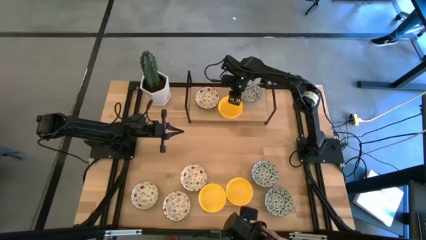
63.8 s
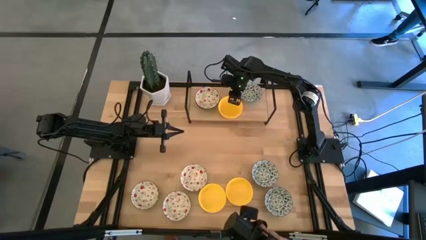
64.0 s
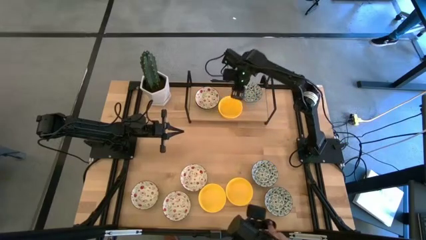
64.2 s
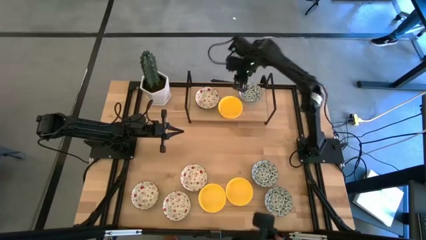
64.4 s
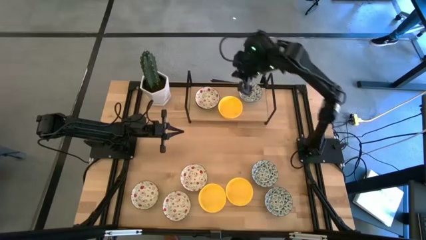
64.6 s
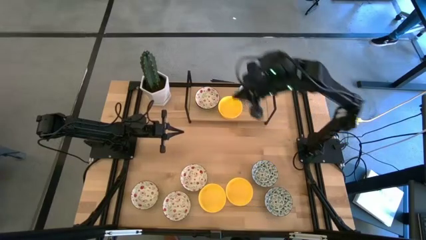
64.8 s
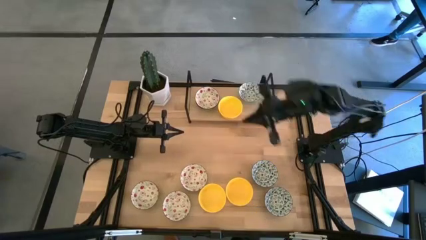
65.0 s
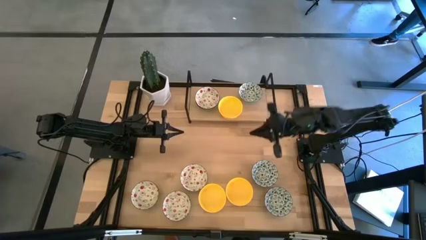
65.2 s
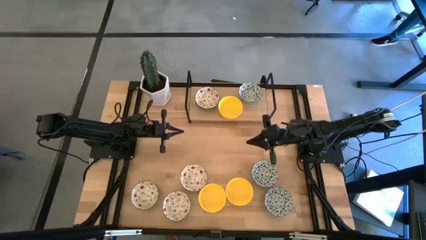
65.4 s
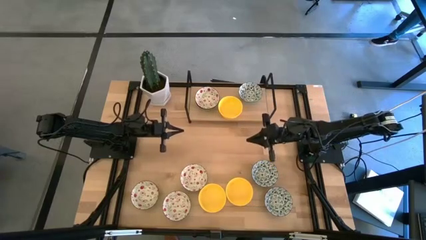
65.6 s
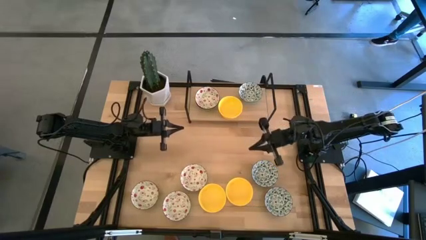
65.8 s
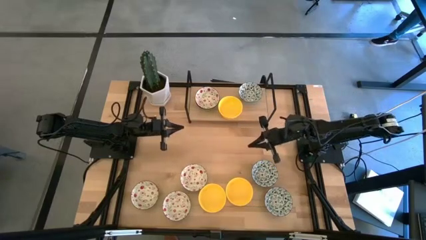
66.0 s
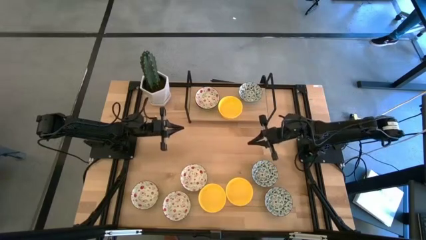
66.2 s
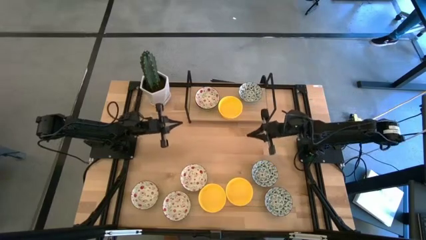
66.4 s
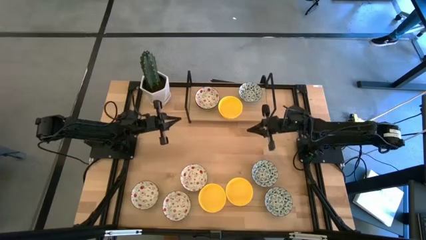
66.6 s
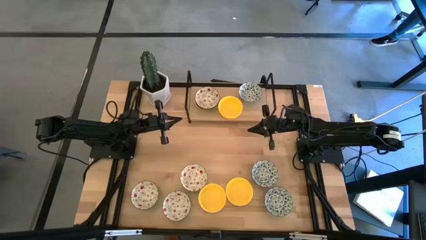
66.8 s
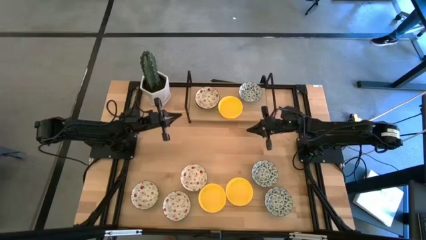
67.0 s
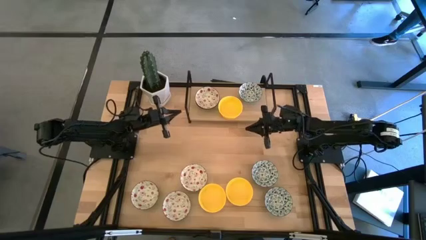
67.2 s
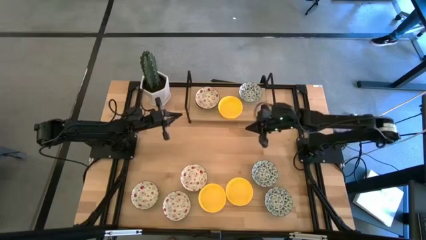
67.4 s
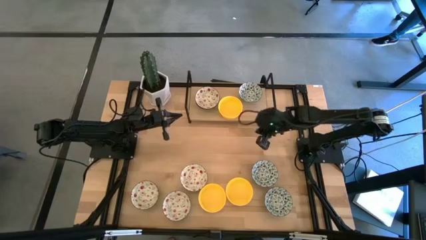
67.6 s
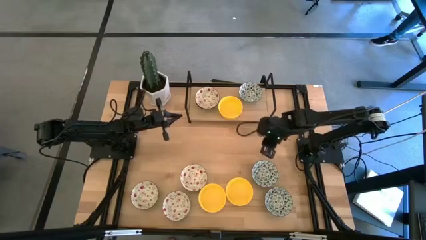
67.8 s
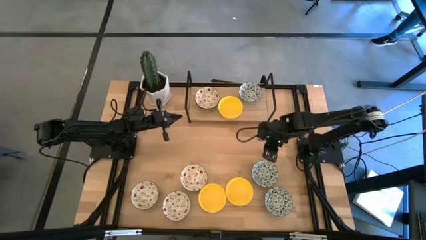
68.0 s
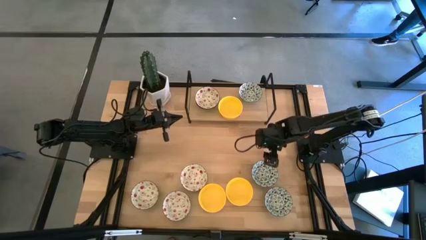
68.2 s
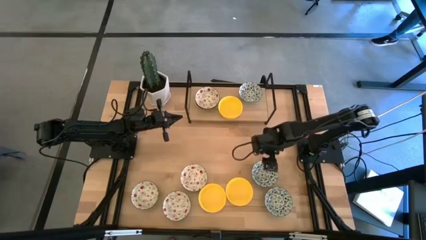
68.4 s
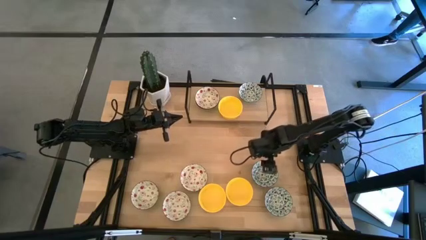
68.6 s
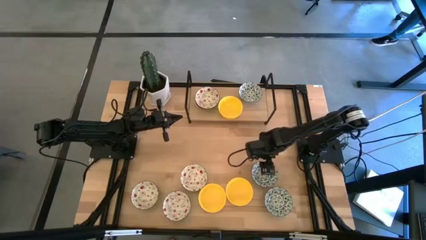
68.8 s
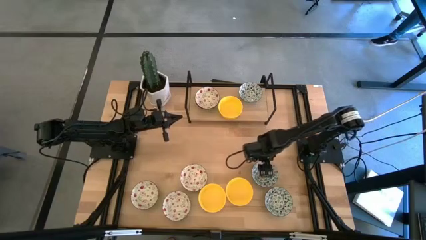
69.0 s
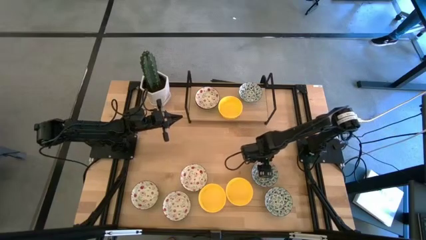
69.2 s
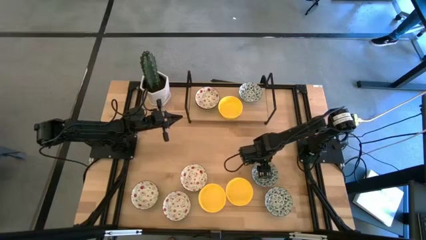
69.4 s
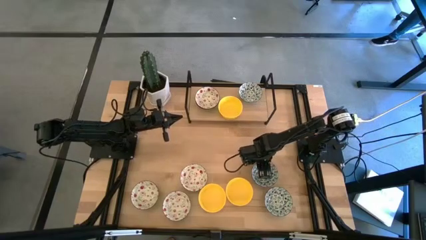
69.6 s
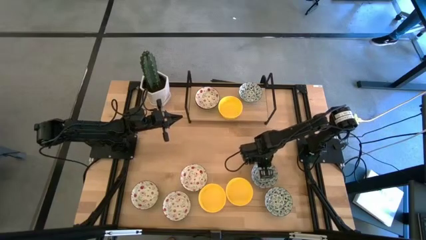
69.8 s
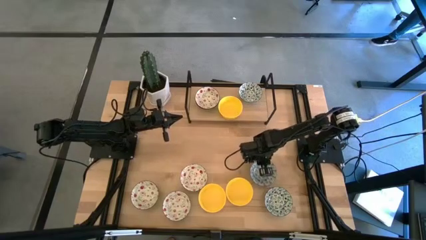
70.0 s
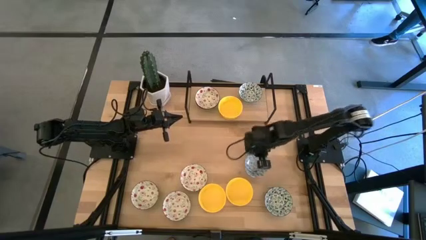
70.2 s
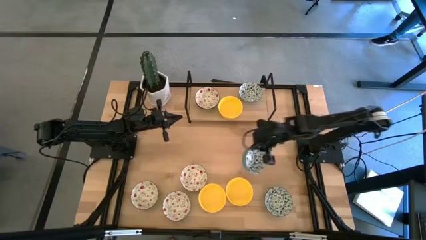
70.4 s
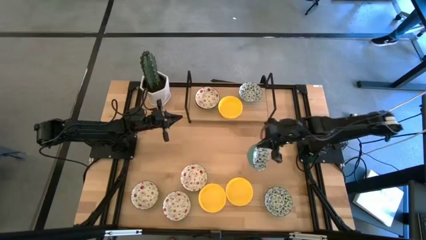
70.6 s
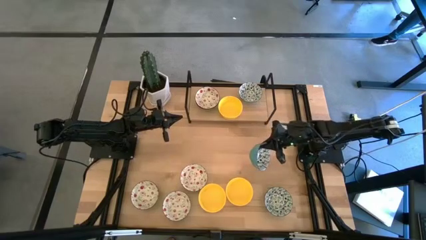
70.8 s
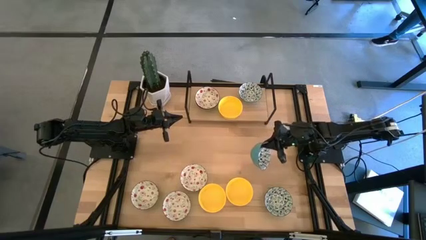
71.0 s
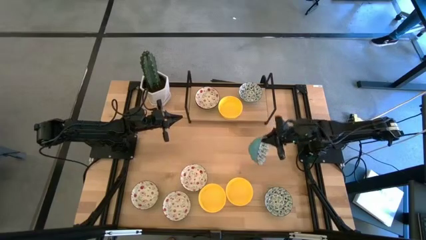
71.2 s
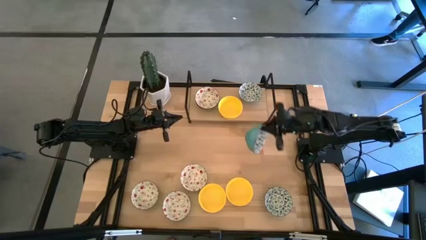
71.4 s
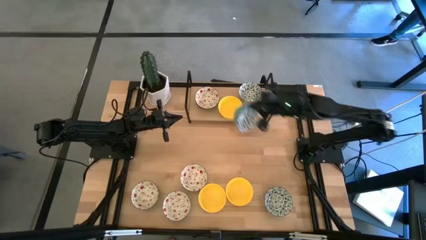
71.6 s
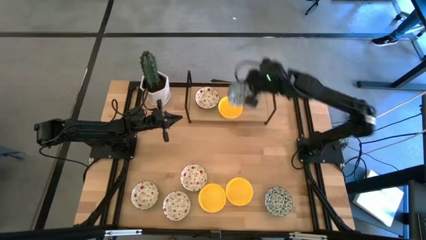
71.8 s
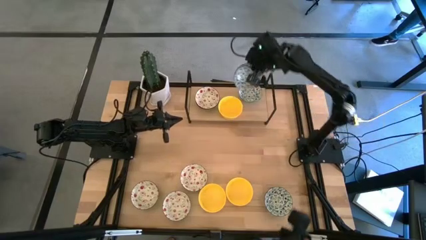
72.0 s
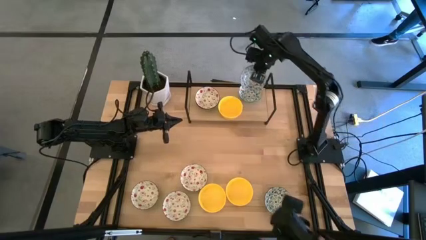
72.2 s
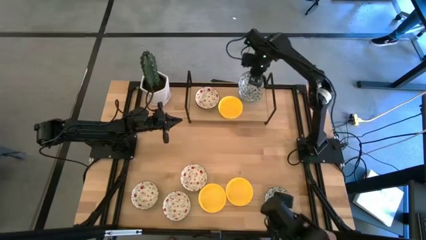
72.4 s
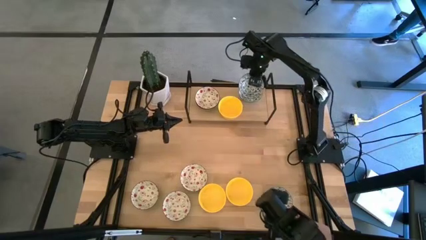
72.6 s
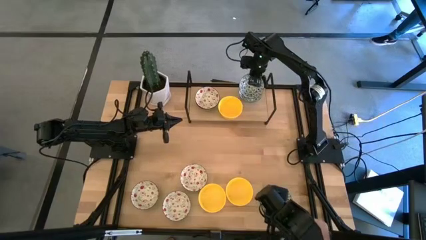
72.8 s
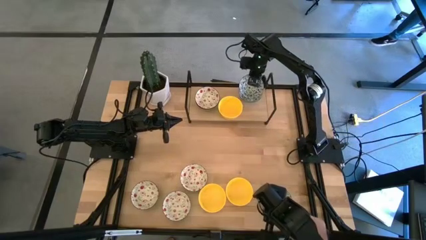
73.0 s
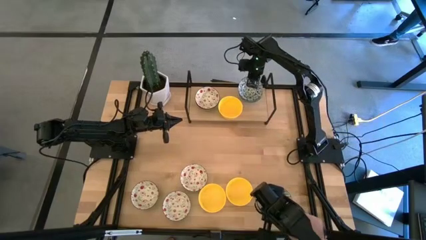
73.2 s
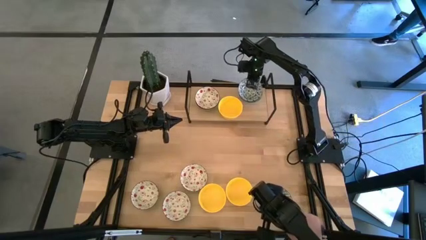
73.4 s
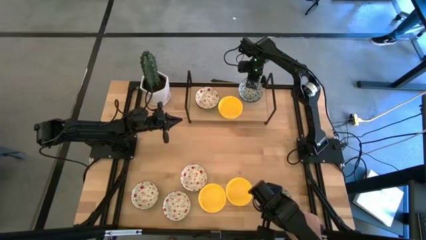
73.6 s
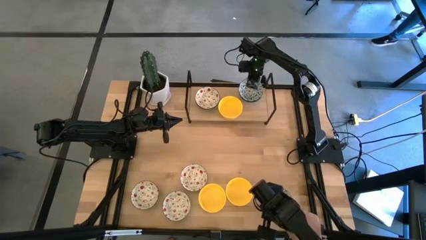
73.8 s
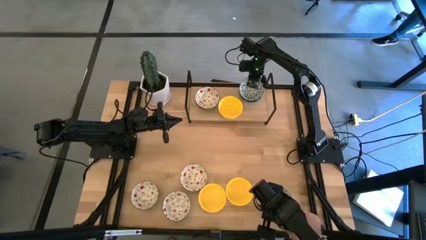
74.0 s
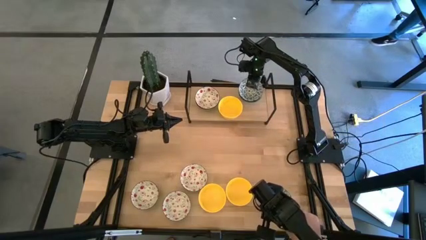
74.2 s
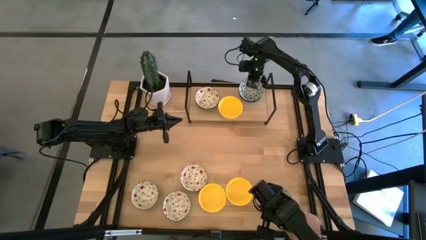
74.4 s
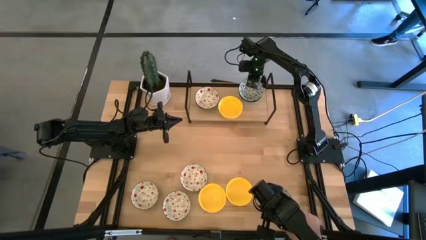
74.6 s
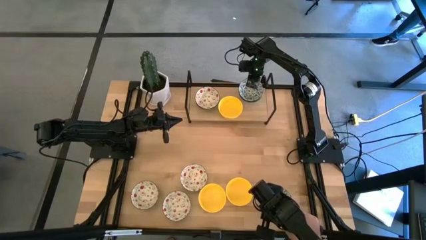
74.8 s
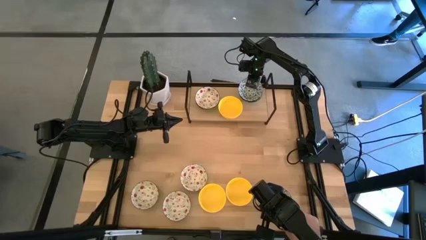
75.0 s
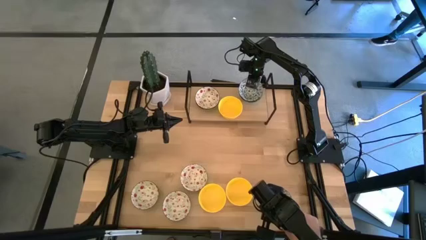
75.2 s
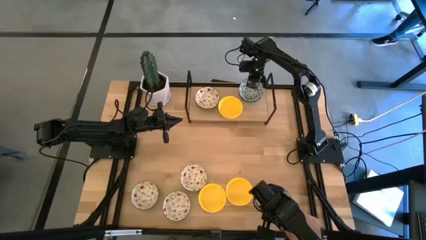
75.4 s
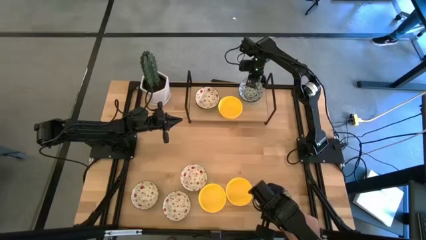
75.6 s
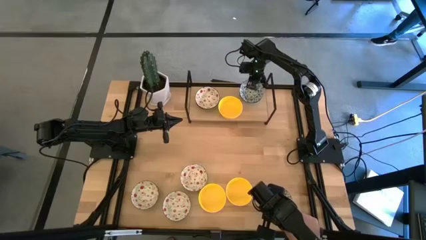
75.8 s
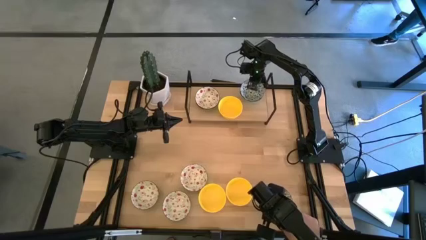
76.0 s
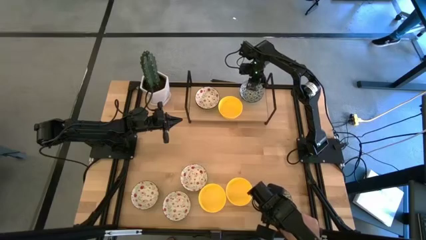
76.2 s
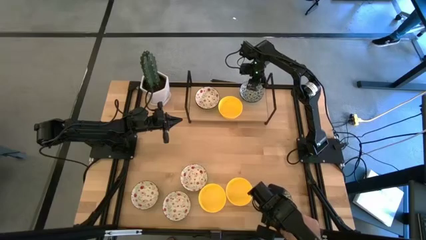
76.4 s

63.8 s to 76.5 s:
Task: Pick & Place Mini bowls
Stack the blue black bowl on top of the blue black bowl on the shelf
